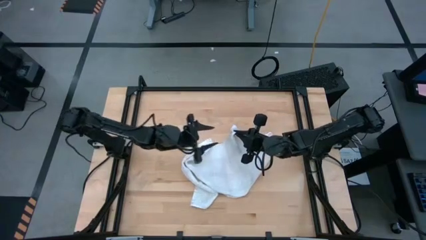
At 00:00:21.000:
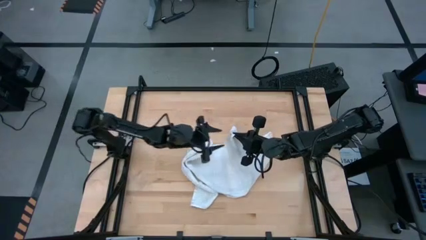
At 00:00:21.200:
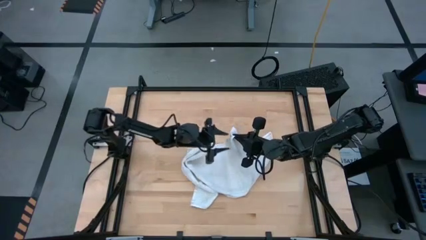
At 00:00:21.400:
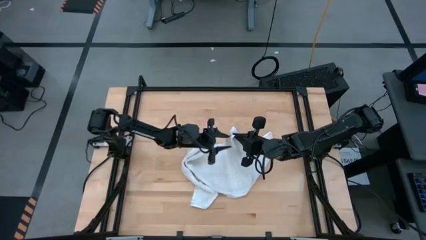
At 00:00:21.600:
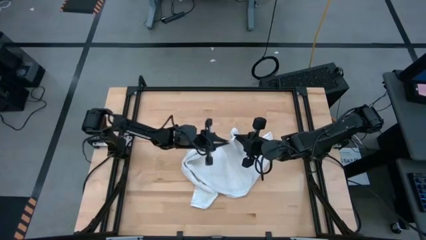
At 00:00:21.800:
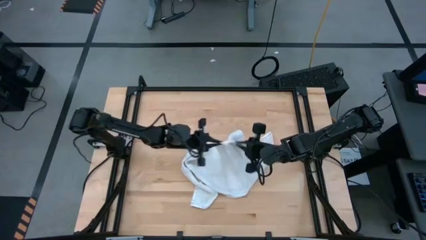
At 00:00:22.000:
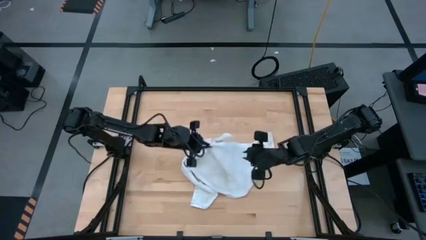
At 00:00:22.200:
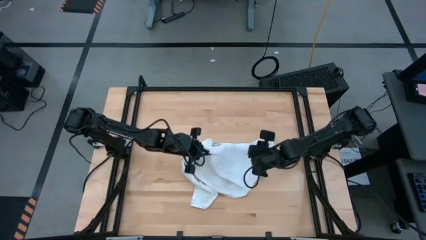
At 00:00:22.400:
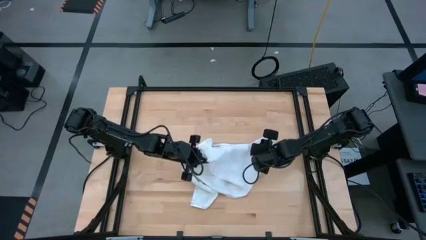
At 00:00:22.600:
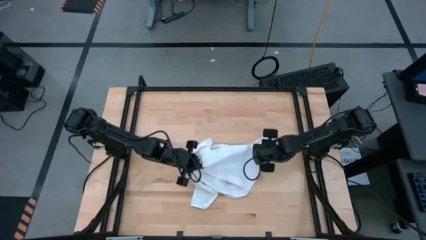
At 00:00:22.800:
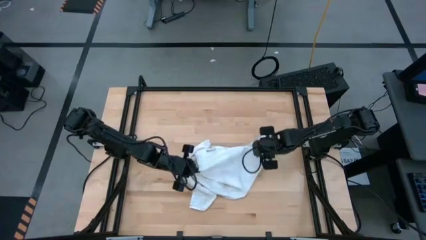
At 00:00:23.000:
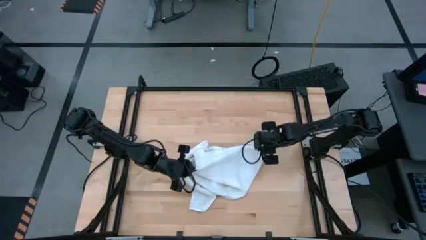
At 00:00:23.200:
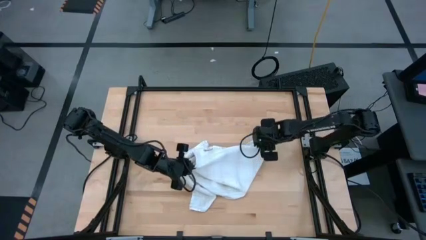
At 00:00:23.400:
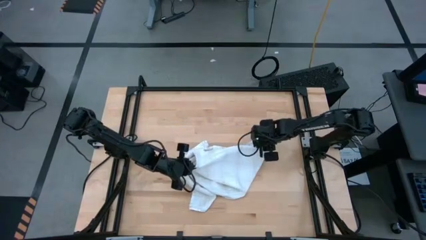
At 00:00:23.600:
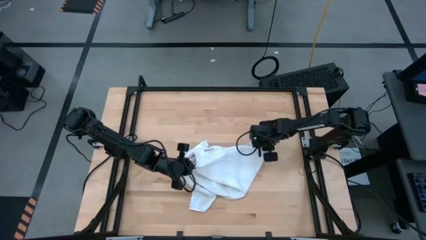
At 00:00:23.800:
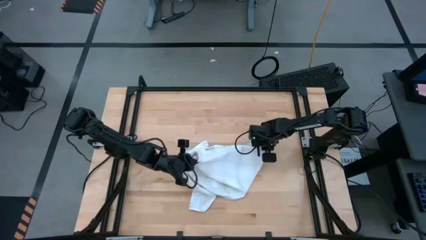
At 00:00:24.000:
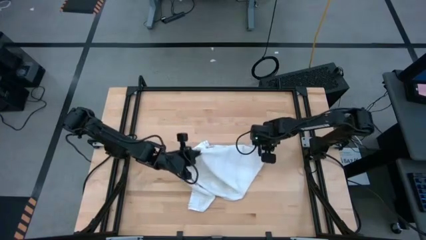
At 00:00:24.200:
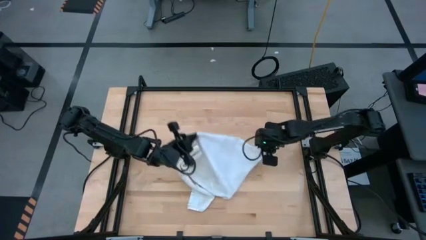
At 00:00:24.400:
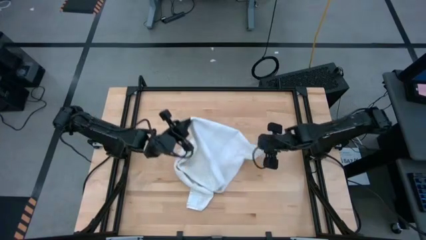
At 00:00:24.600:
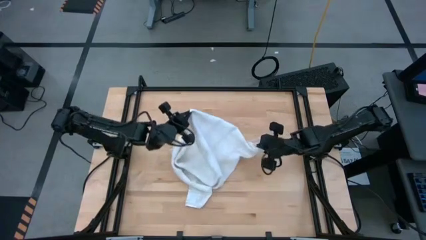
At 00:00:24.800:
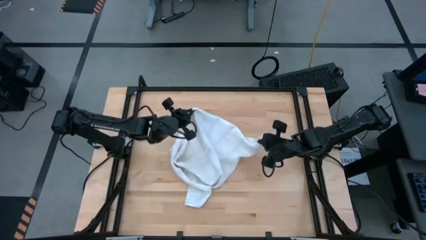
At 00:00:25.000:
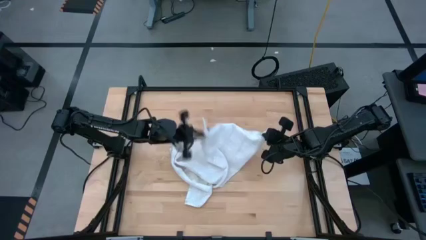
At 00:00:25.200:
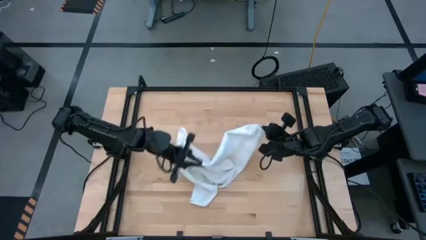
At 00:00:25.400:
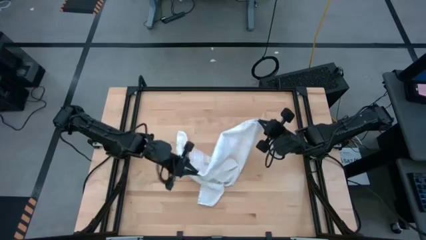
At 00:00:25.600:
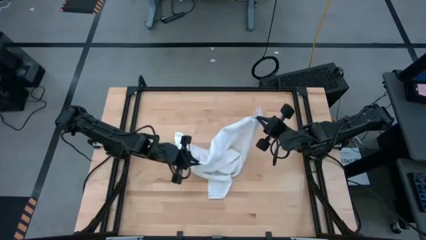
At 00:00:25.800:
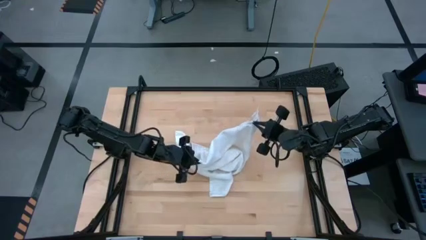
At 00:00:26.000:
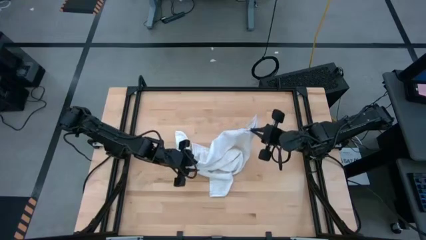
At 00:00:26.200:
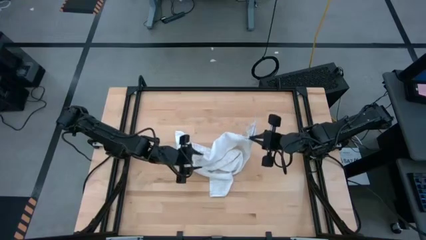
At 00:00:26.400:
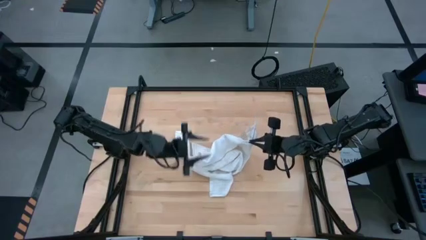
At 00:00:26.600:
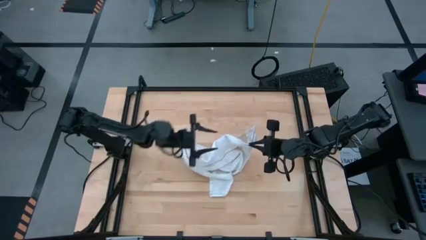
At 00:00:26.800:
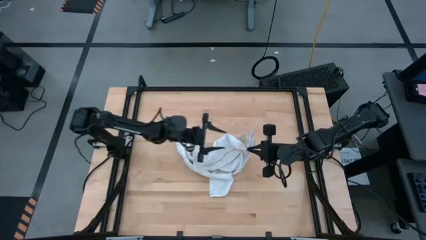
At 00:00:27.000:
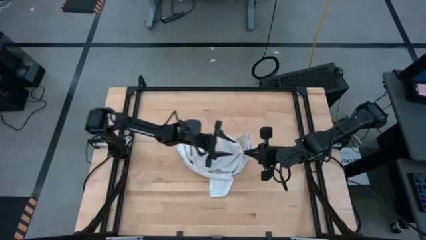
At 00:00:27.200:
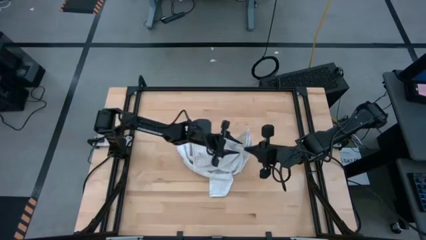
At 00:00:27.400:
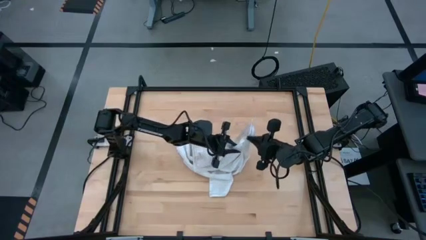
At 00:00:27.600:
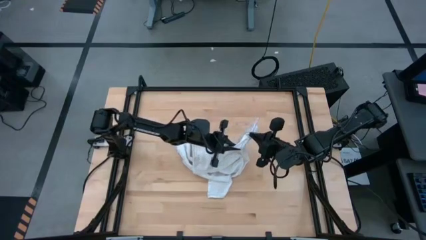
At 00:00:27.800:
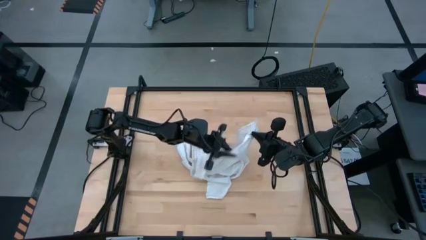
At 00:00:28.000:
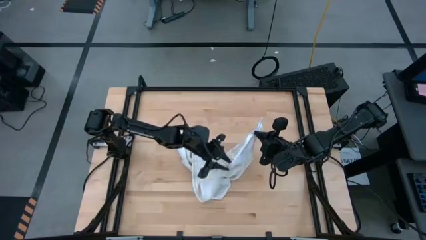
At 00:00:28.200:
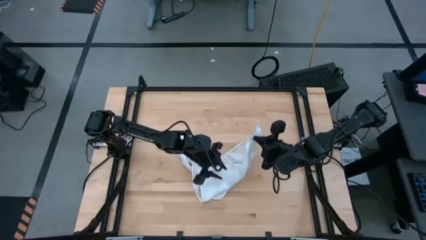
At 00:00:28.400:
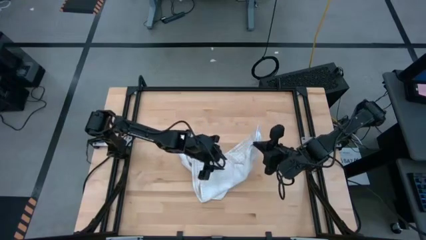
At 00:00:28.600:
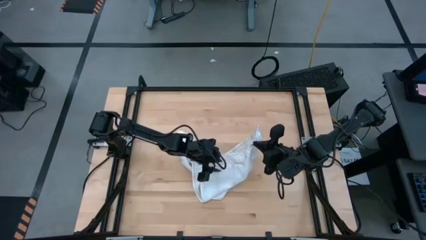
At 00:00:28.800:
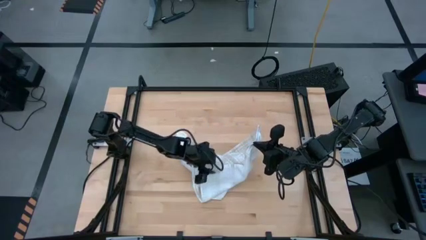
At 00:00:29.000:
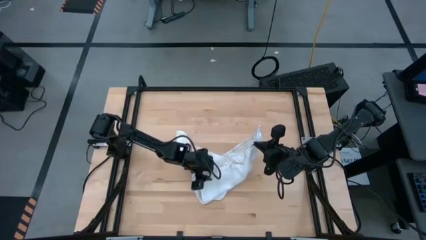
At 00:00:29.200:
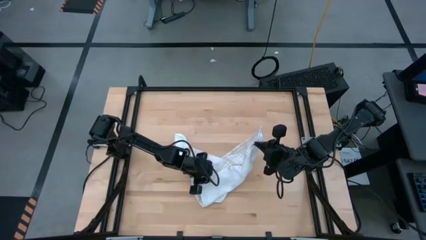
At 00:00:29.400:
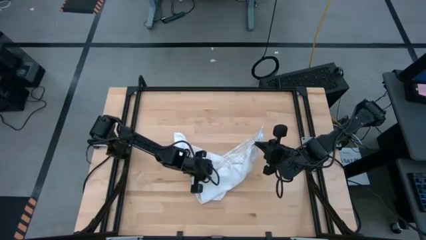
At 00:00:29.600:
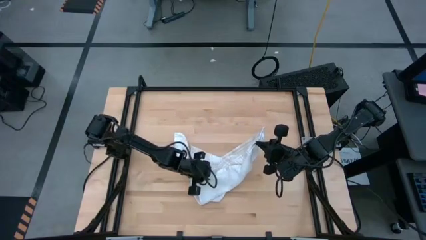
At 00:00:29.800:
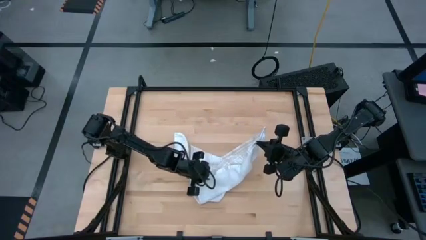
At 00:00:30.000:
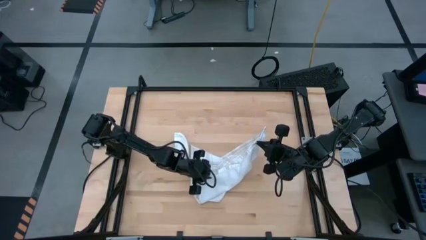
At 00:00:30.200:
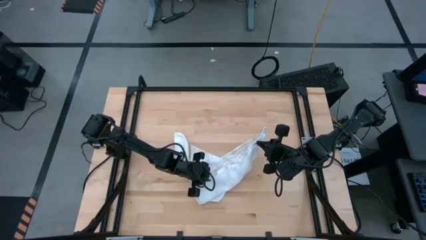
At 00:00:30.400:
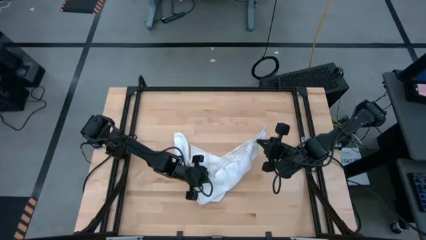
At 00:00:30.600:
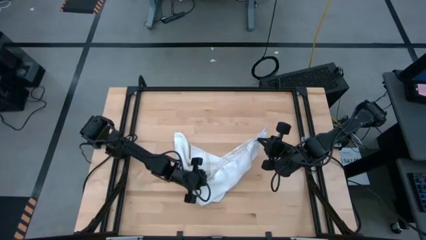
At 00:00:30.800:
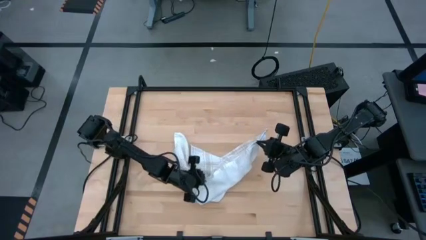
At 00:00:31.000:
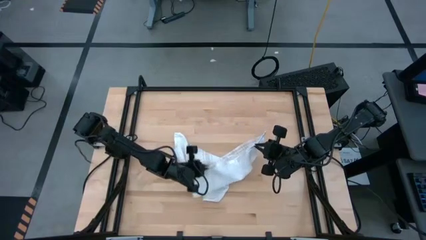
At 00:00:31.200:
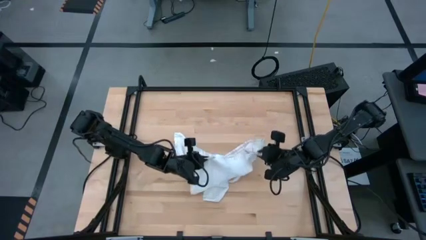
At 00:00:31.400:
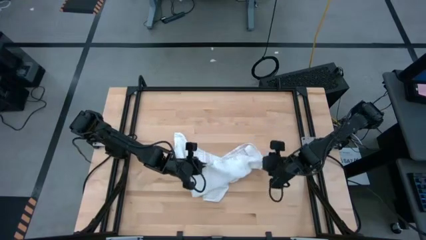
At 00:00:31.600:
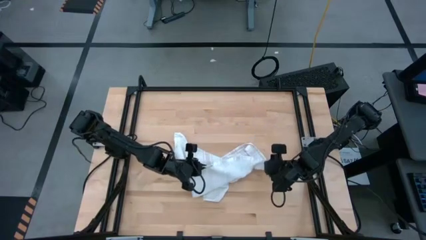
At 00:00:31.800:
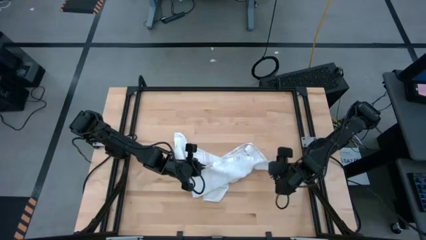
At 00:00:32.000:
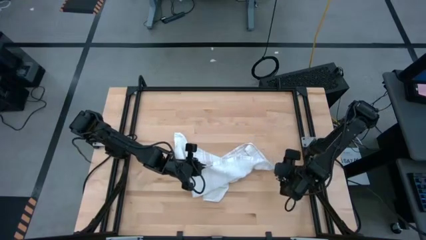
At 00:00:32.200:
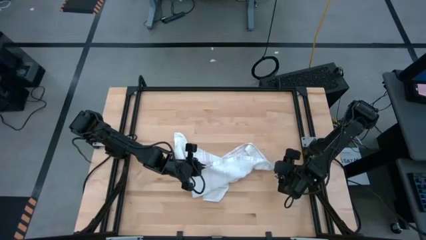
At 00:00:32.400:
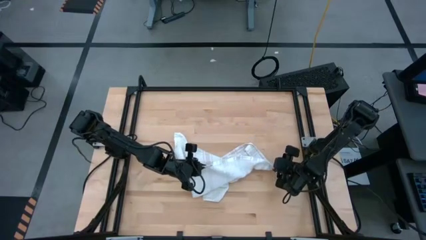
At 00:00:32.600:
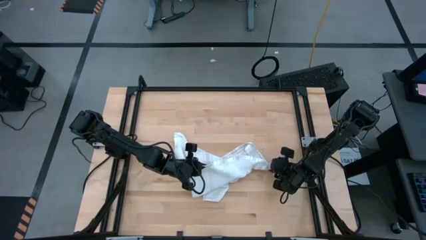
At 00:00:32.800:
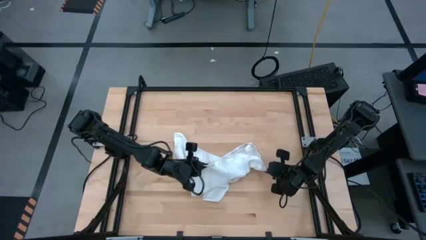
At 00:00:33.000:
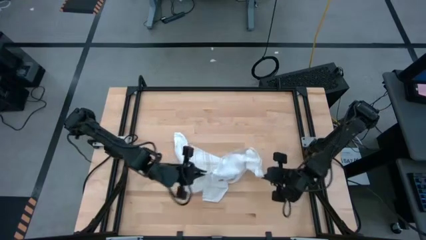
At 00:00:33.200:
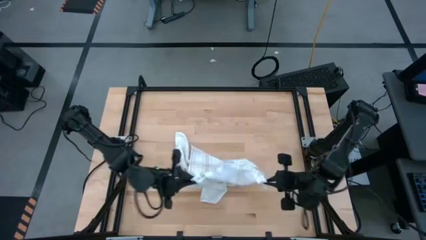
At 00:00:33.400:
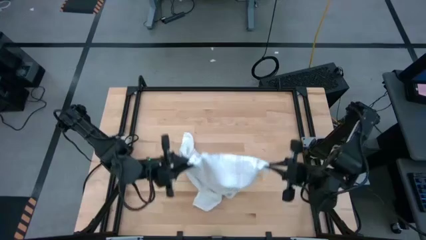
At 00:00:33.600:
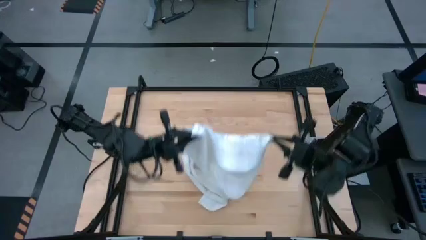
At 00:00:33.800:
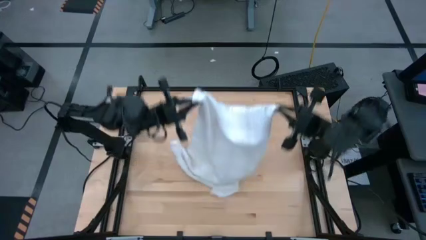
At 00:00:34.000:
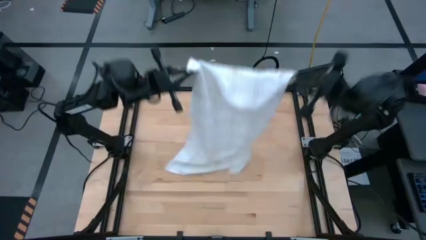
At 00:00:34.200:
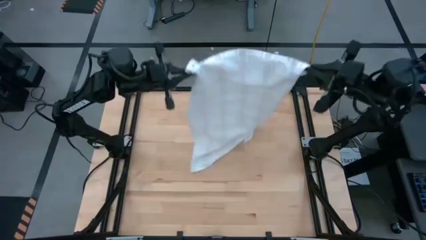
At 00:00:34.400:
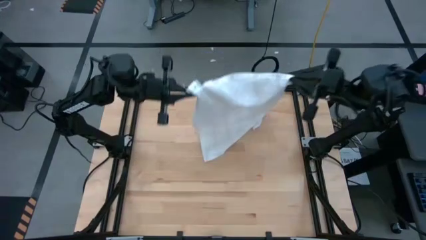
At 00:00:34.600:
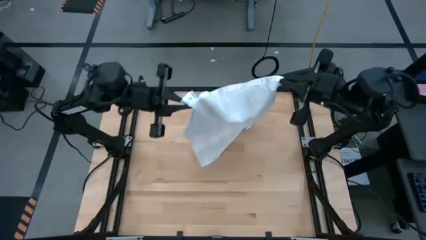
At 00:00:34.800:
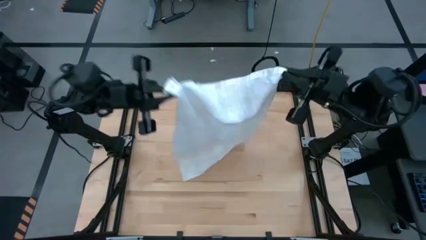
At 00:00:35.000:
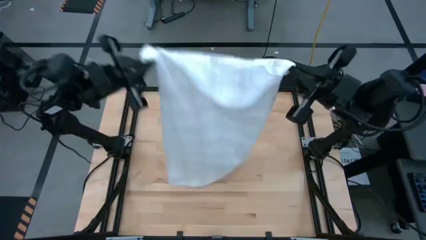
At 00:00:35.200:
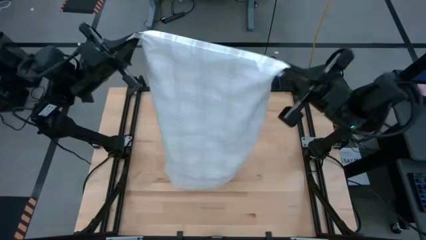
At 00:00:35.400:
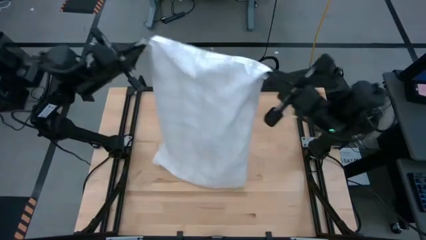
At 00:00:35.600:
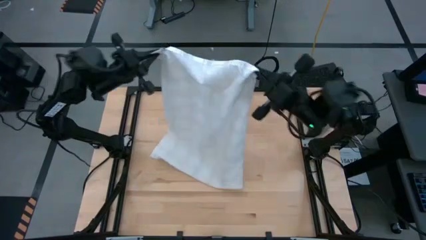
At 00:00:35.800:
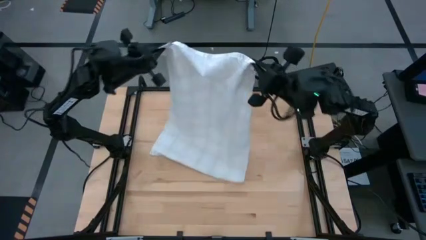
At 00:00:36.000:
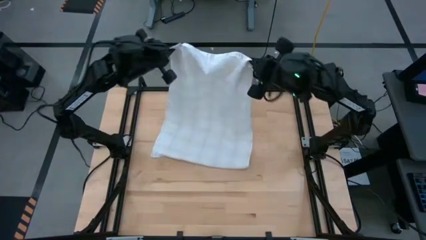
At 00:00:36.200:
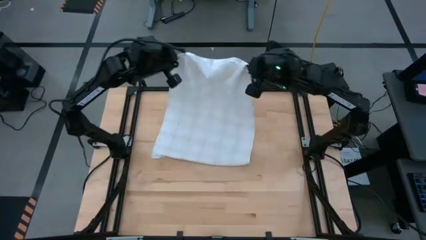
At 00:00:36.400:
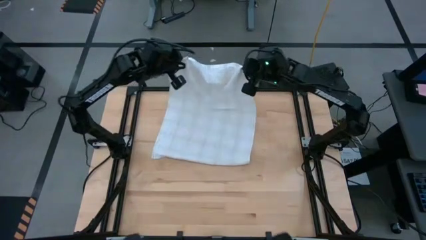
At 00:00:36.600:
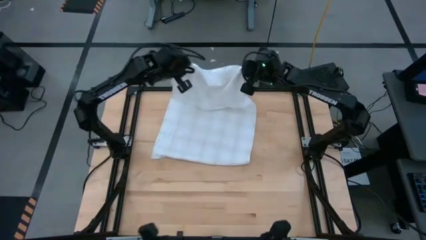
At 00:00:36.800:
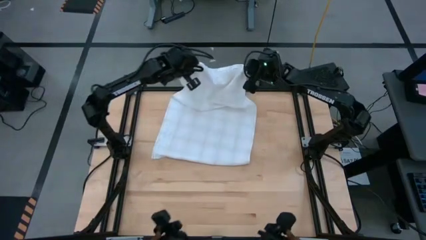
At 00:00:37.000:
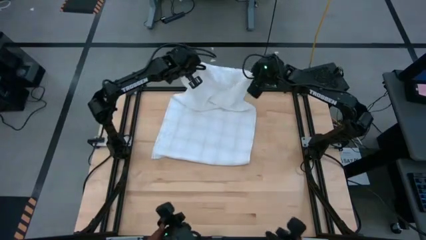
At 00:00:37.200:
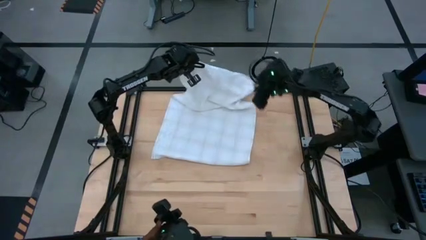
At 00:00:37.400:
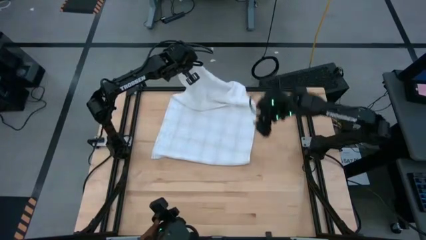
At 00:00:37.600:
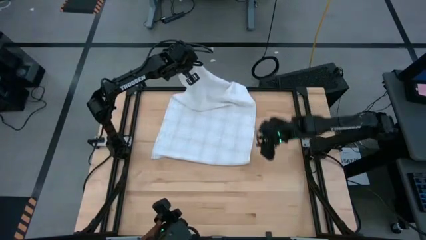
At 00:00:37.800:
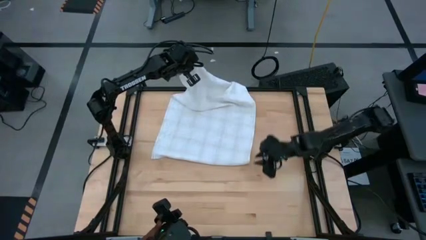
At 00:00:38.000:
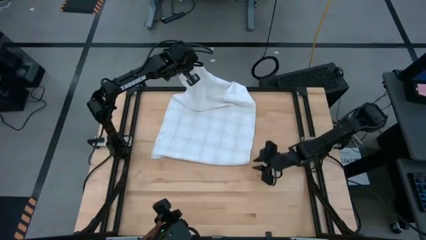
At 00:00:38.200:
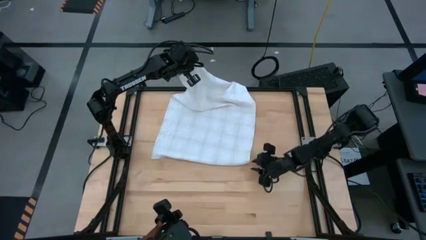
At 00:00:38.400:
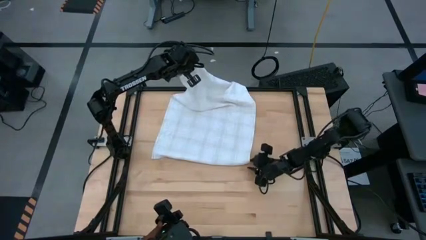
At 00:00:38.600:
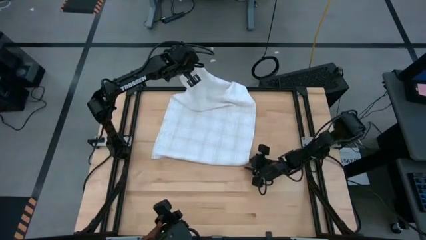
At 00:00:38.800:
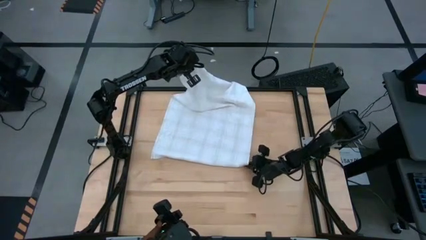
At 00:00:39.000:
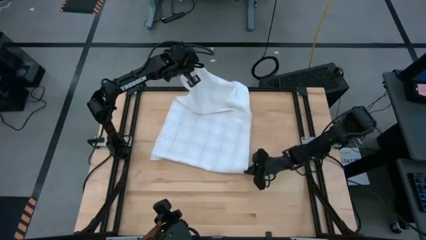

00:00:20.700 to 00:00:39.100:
Task: Roll towel
Roll the white towel
